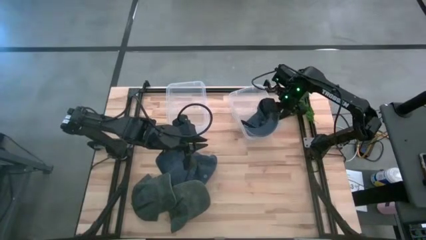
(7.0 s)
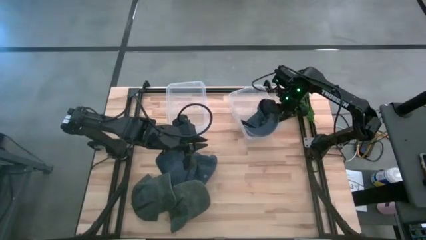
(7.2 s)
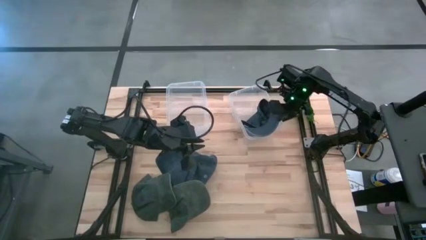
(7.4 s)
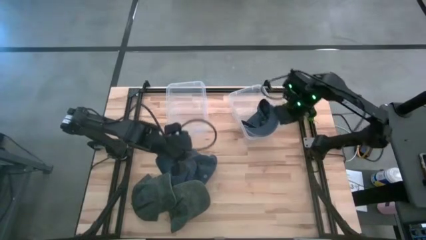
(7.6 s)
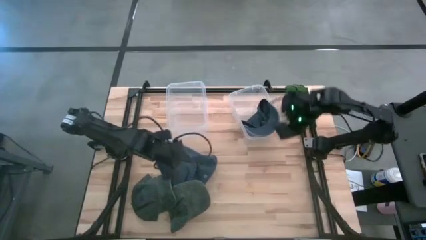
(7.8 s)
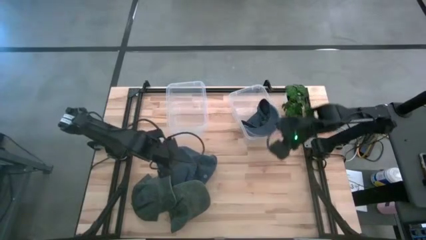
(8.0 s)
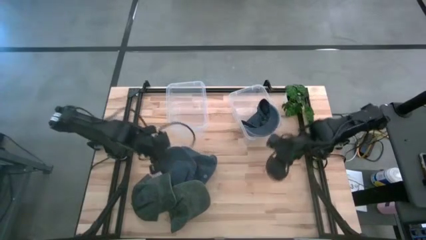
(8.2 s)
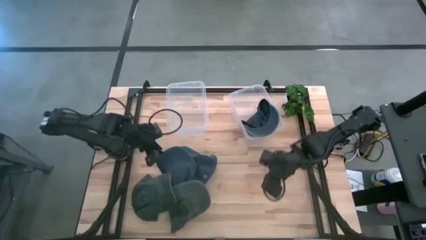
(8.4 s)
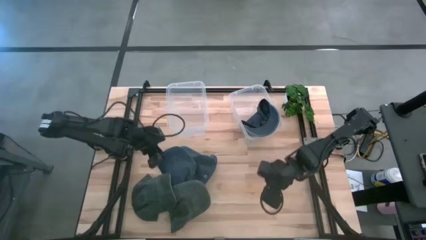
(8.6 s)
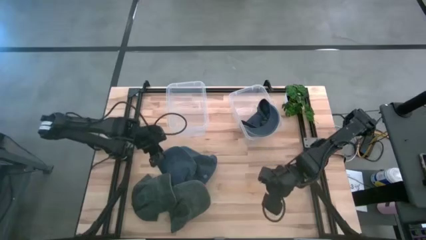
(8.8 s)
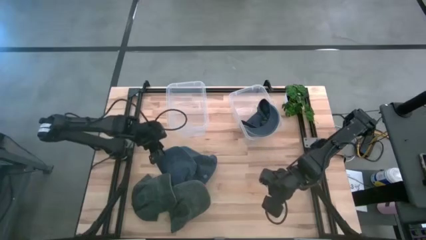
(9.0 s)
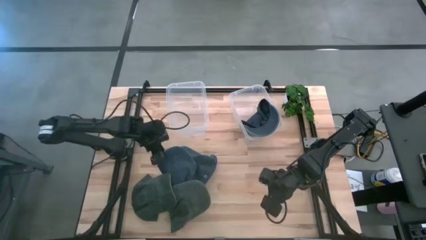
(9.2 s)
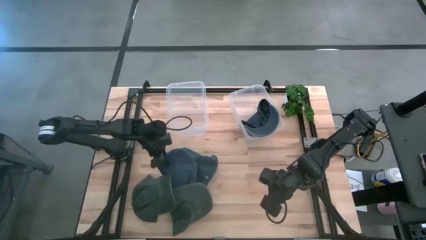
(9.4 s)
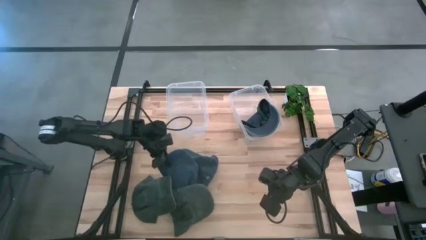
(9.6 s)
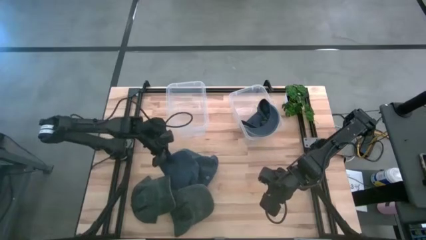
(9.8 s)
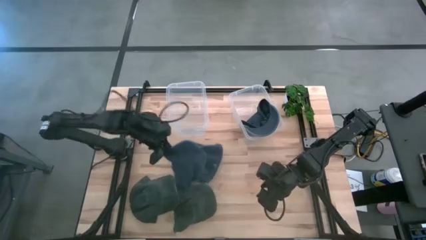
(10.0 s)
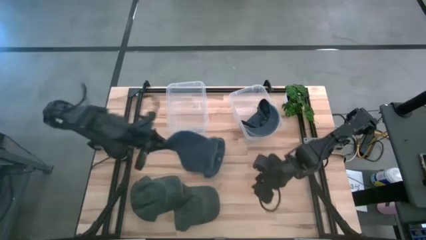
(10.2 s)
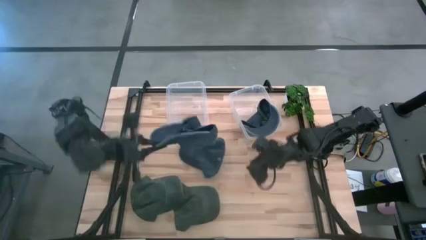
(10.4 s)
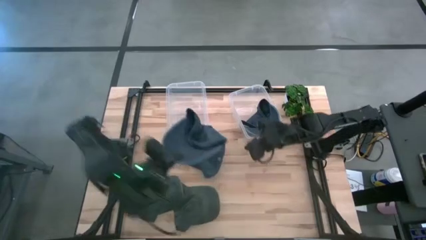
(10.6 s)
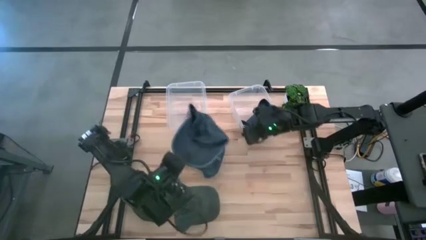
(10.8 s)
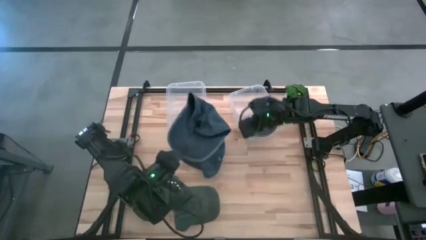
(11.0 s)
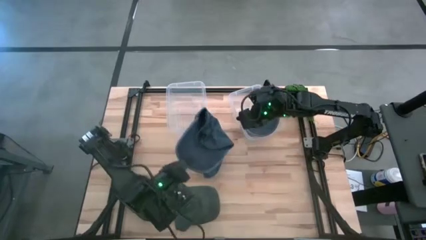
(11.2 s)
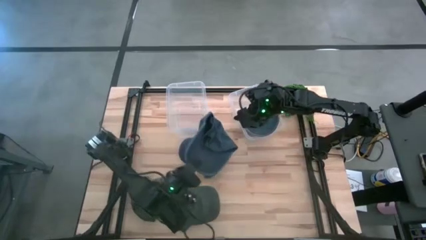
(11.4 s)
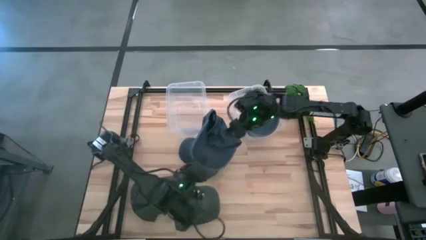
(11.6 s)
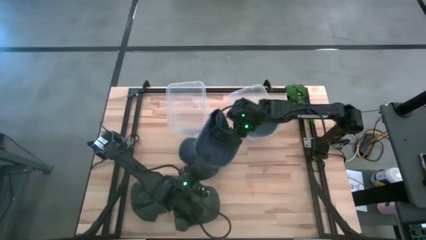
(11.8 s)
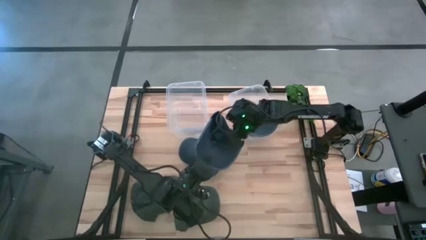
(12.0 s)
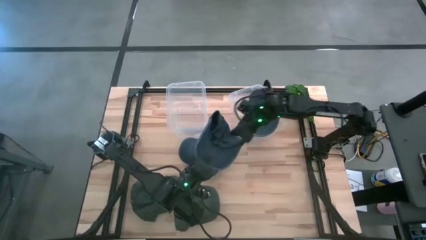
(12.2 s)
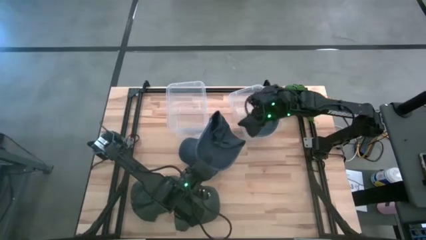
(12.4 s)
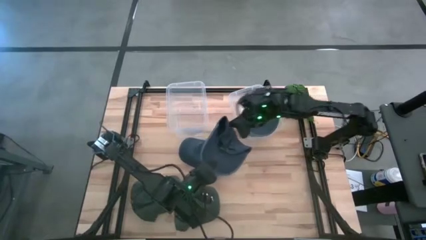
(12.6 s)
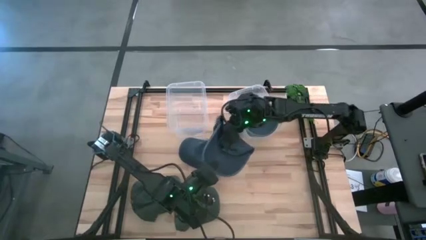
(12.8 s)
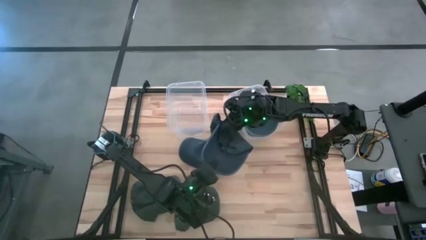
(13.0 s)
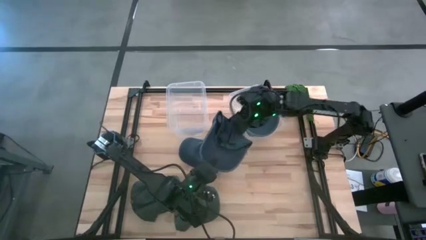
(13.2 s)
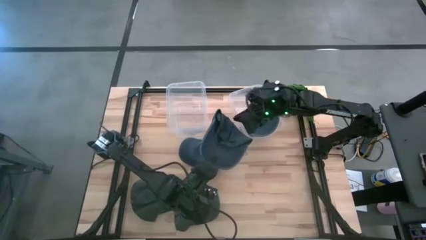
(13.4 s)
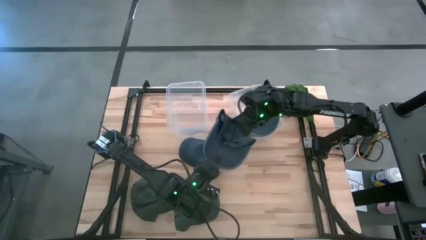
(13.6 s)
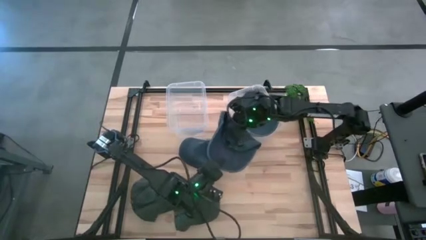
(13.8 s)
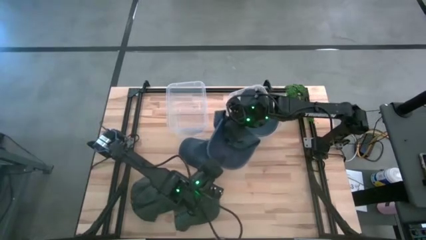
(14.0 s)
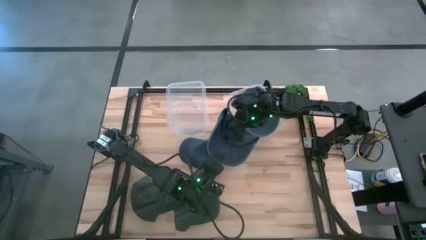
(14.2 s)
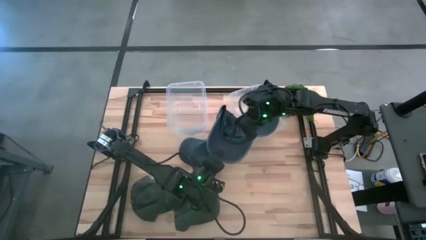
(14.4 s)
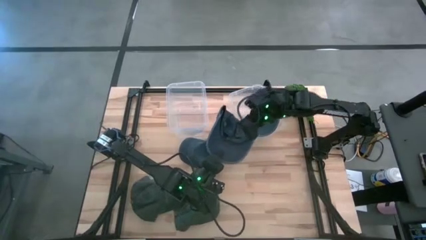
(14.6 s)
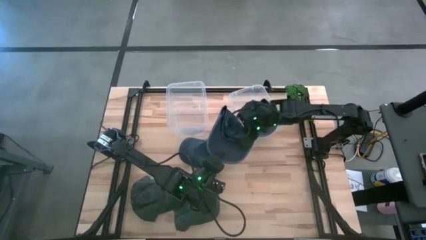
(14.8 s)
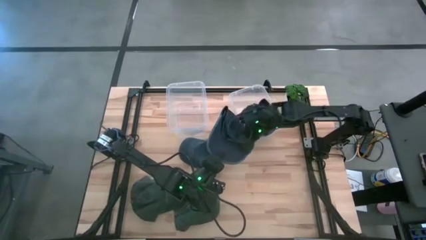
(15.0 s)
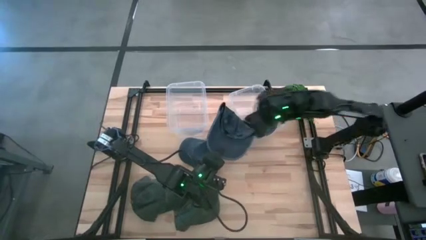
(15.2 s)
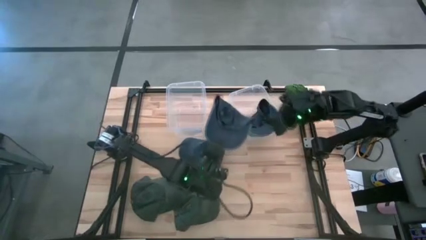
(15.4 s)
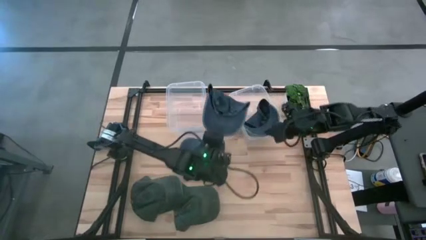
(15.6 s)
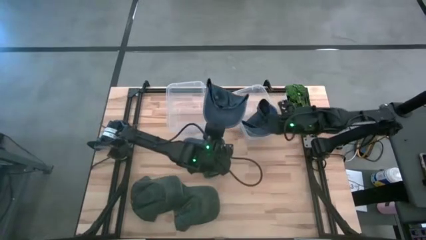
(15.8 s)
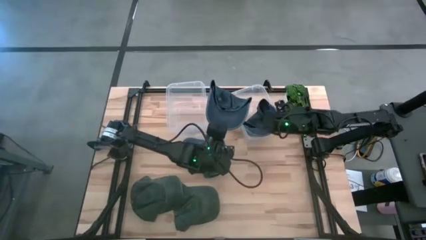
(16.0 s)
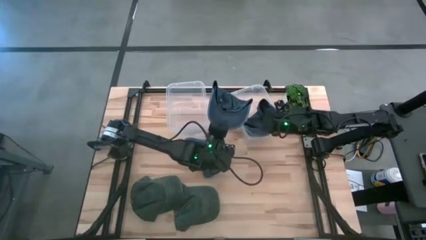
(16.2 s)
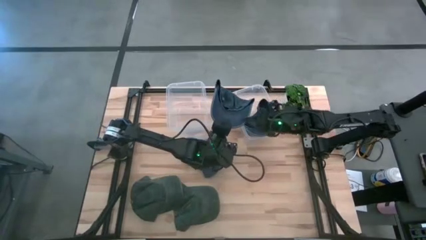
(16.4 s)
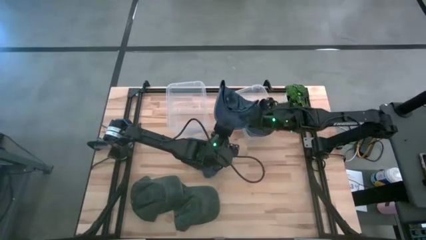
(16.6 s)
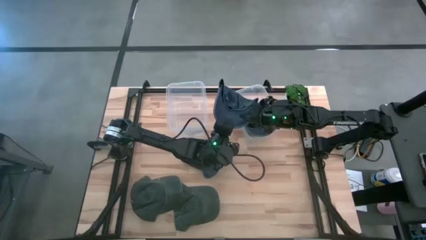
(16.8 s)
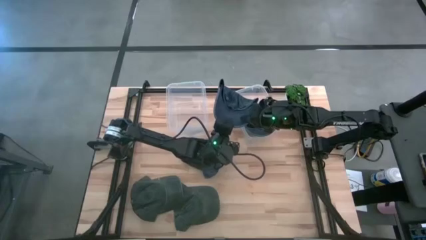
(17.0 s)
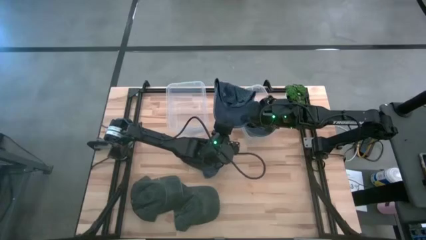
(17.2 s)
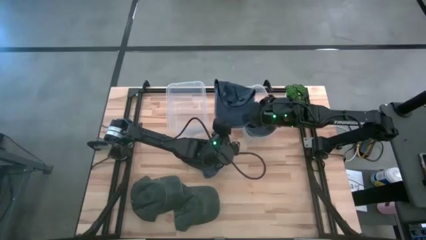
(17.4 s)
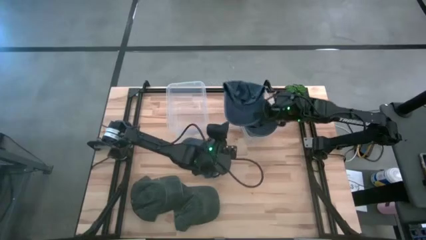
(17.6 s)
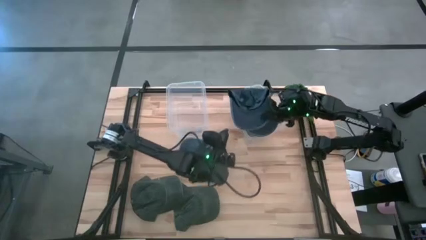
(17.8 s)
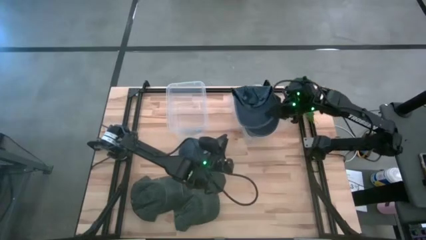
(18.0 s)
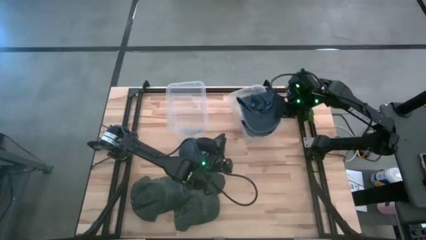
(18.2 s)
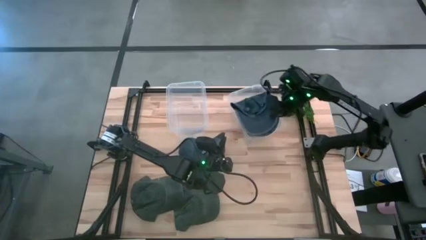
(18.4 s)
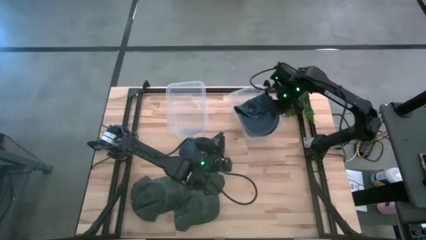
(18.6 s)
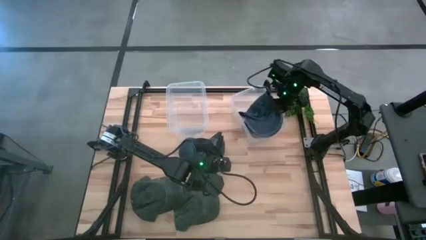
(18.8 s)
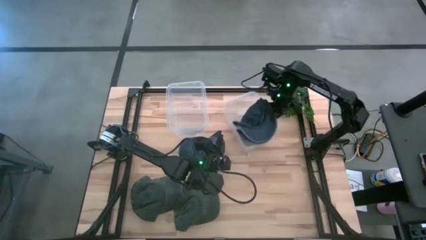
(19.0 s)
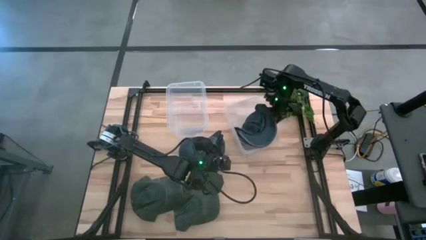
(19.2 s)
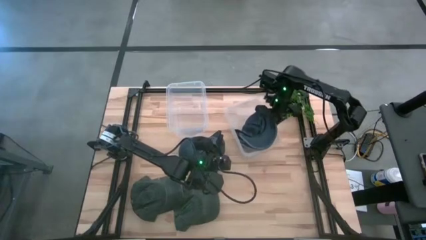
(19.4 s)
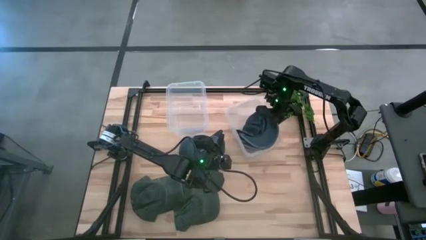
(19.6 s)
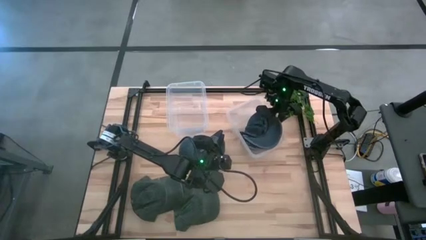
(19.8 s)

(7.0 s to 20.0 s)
Task: Pick & Place hat
Put the left blue cap into the right transparent bin

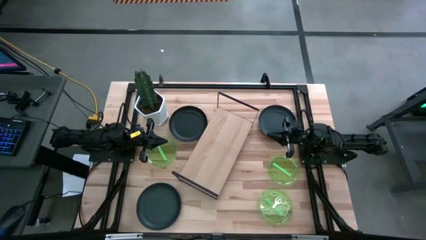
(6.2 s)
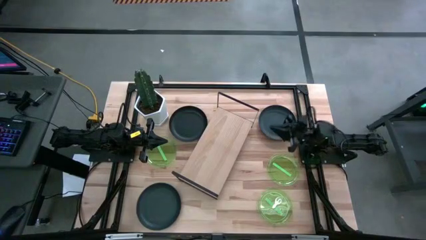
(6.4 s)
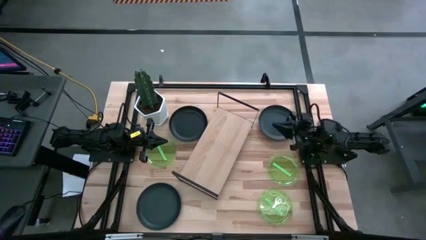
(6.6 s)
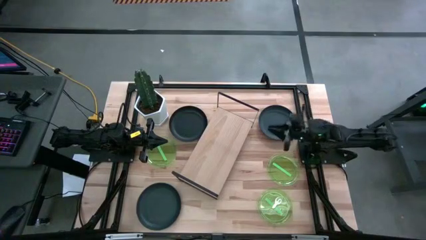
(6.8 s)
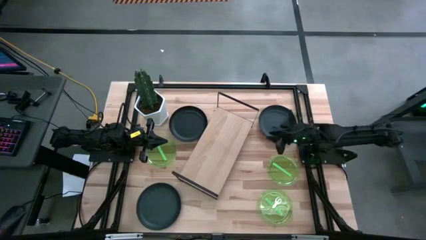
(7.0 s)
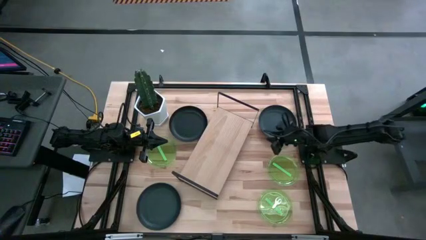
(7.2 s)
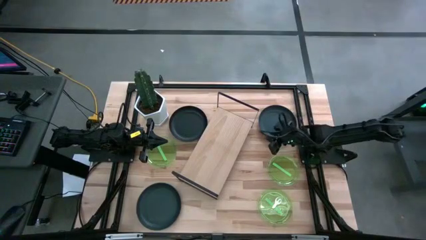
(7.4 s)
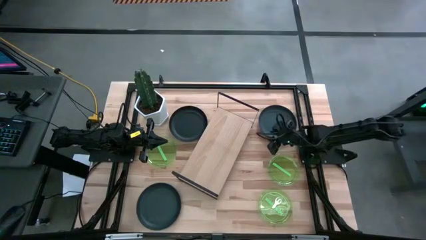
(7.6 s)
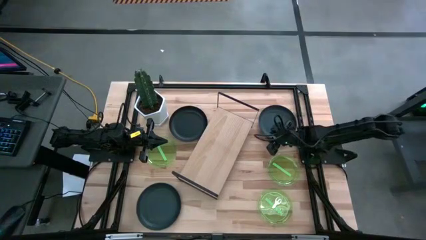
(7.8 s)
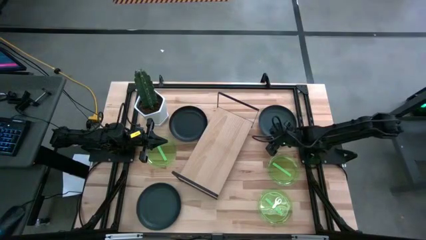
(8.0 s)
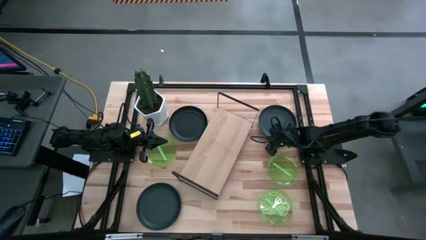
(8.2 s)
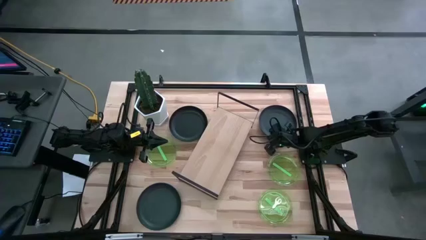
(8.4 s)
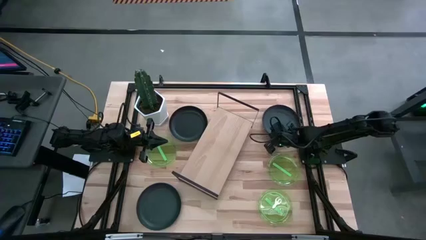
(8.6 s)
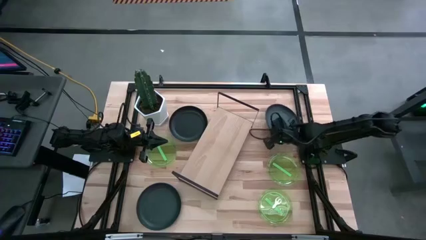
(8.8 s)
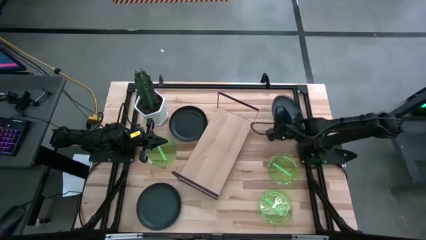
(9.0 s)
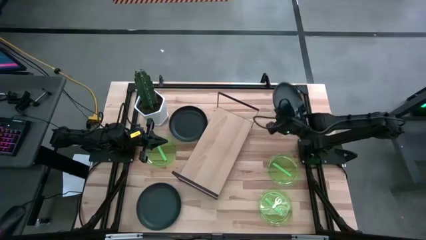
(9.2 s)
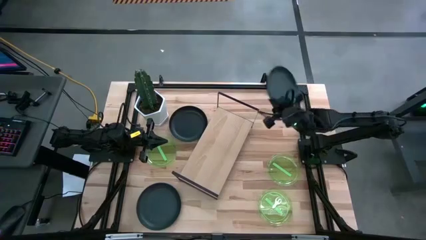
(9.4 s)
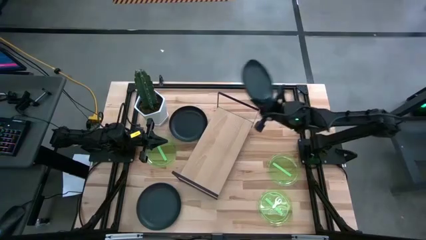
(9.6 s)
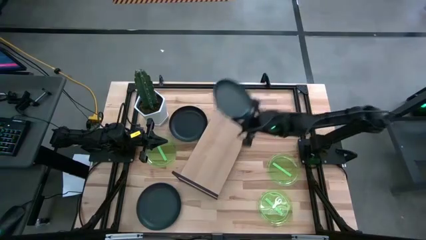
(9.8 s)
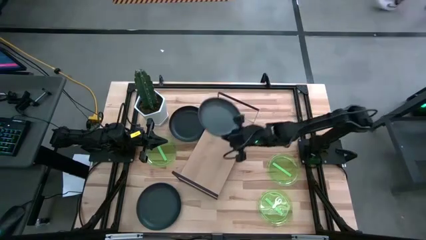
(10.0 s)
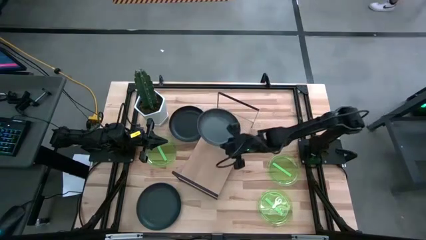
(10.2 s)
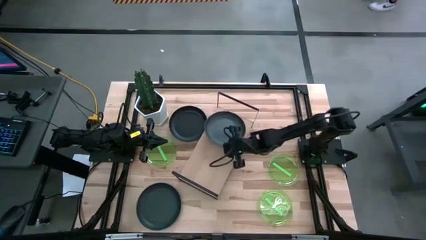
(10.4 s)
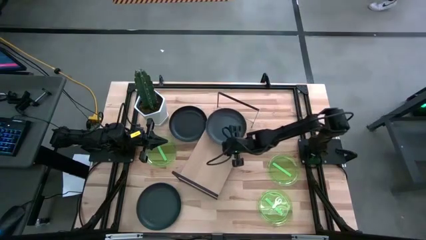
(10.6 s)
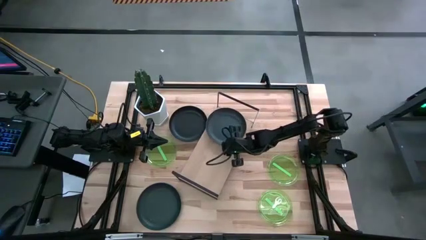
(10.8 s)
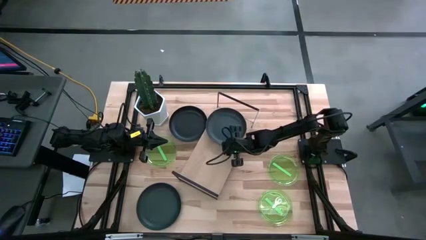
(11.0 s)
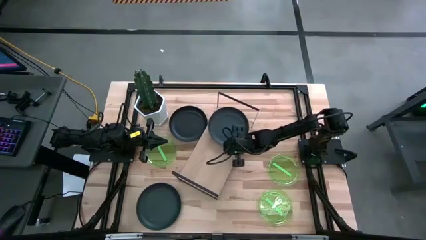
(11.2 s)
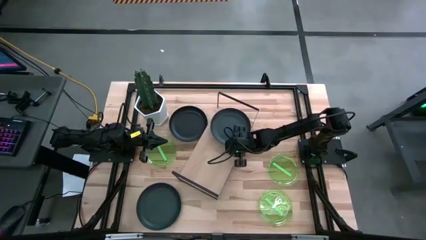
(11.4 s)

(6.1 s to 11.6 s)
Task: Place and stack plates onto a shelf
Put the top right black plate on the shelf
